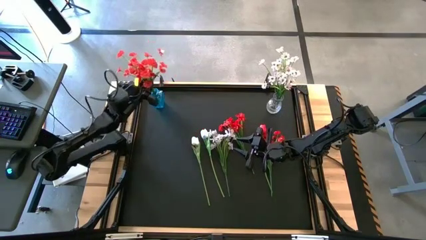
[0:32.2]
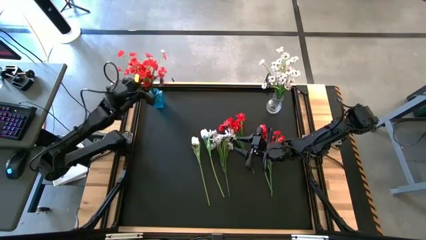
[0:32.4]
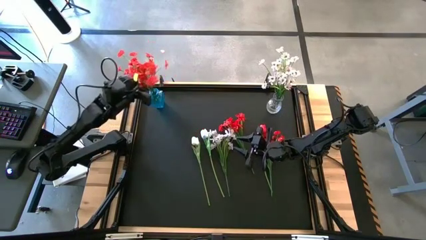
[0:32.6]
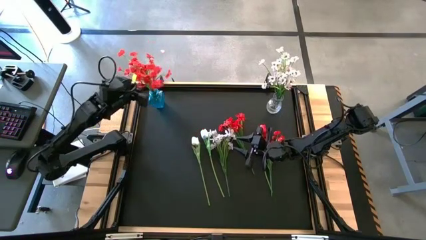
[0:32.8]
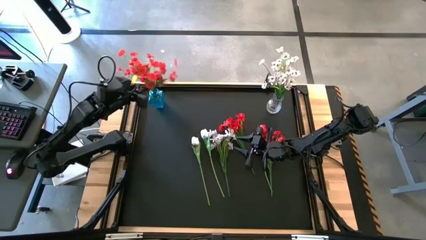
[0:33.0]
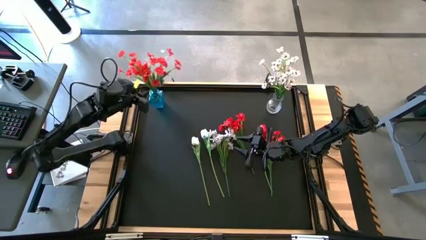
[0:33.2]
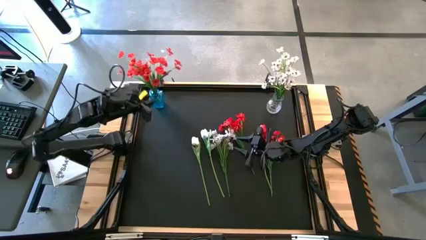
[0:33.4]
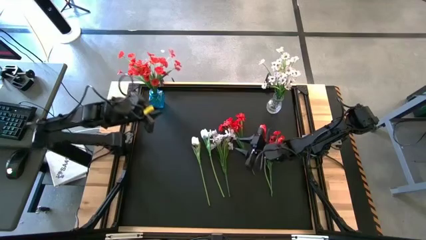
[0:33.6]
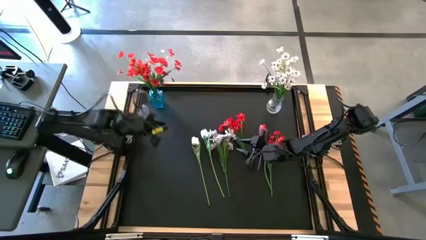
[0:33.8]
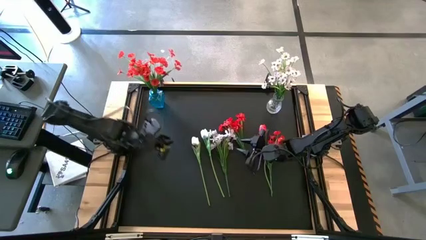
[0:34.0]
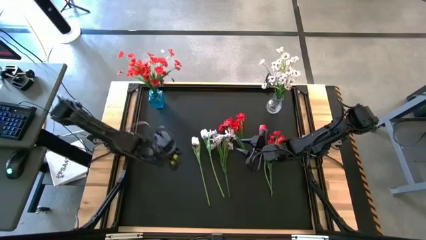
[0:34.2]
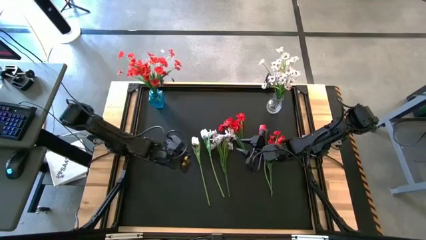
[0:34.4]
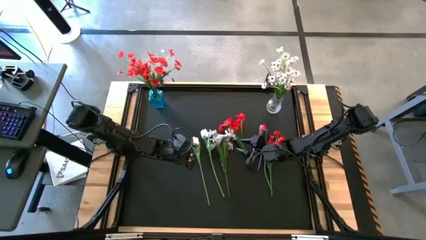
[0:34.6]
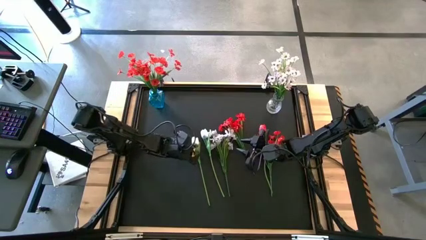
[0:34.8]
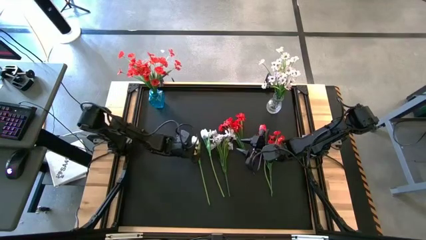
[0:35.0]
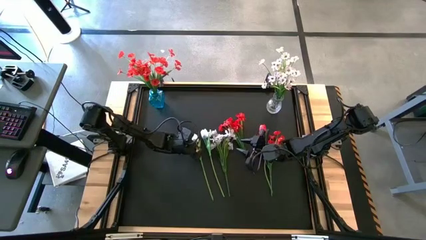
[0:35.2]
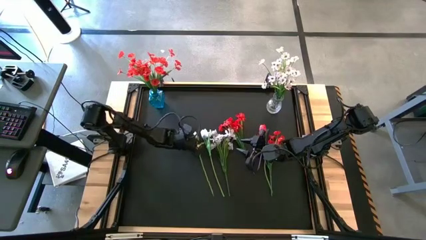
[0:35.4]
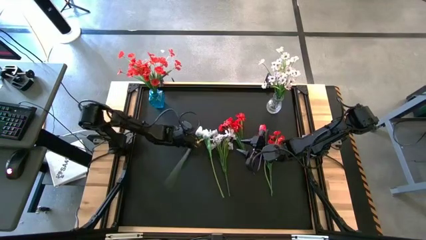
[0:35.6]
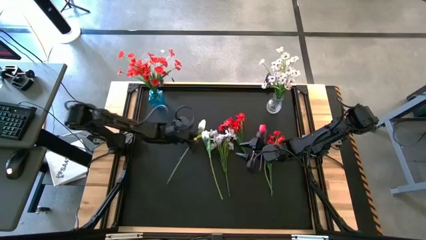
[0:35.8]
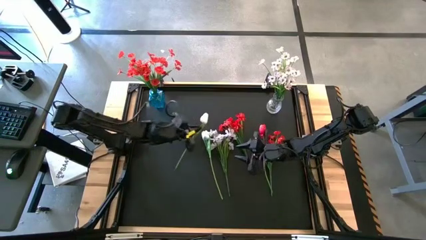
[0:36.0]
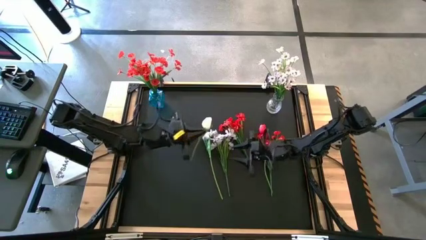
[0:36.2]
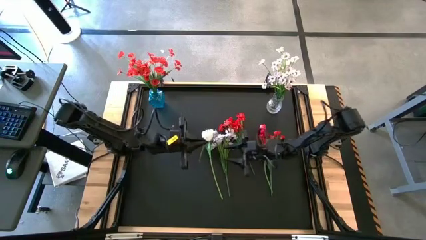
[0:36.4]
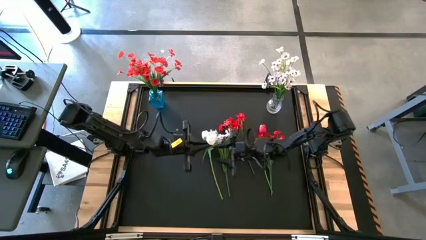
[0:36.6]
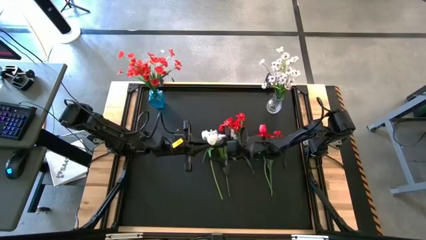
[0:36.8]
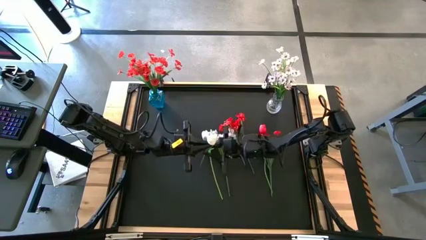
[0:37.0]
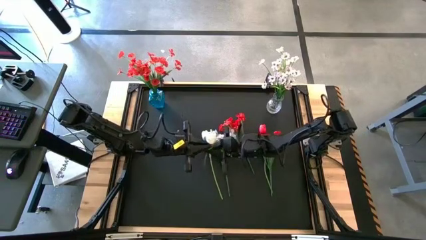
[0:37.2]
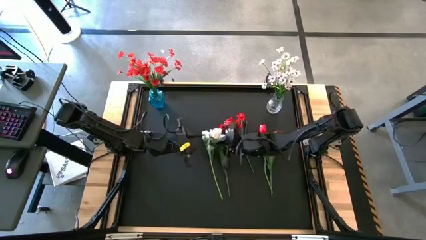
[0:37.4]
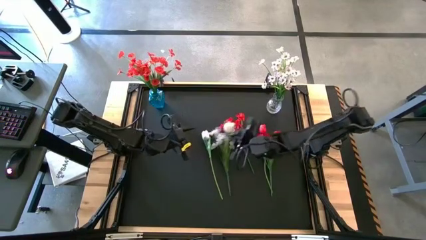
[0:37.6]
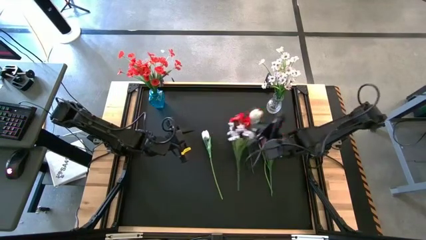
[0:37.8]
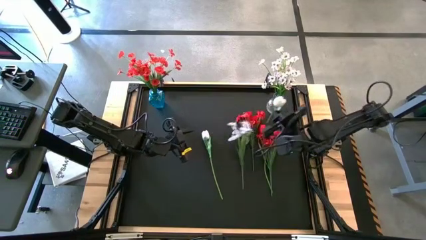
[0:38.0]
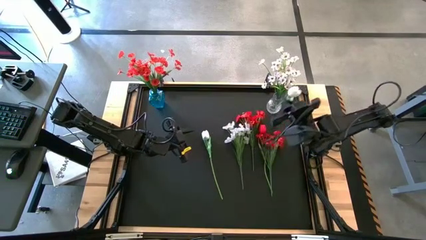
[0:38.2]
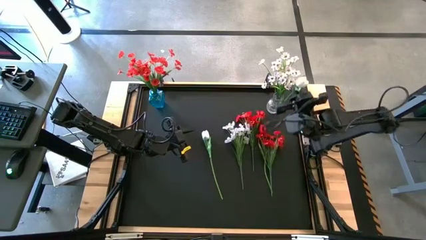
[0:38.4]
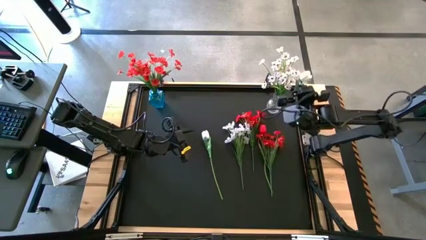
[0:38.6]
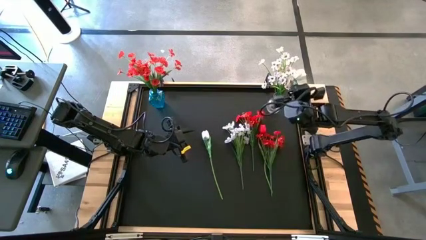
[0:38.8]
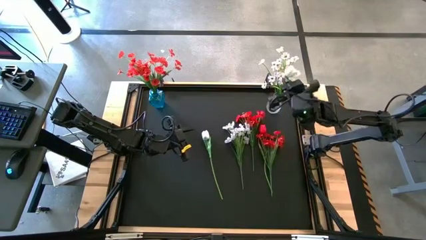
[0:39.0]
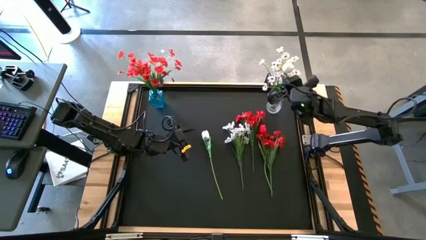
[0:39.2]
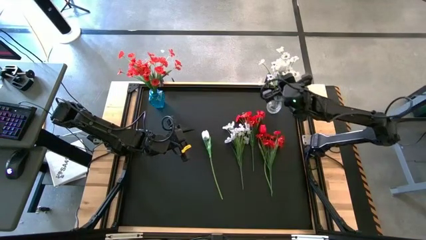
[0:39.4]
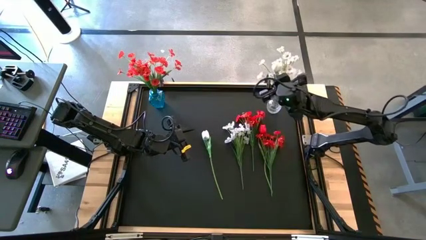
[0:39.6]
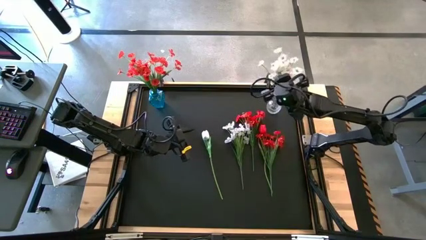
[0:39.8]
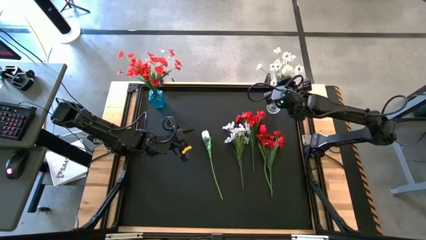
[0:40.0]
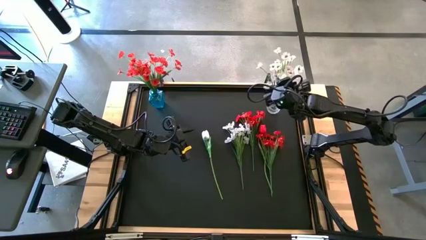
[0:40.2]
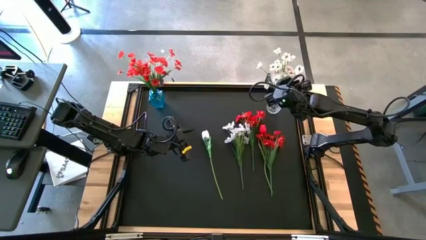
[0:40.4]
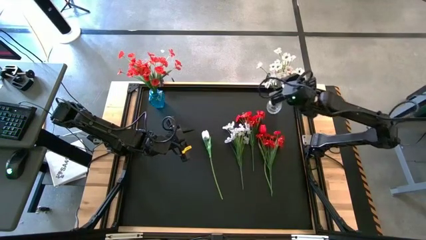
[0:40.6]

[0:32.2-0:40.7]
Task: Sort flowers into vase by color
Put the white tulip into the transparent vase

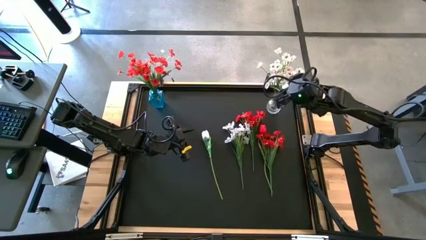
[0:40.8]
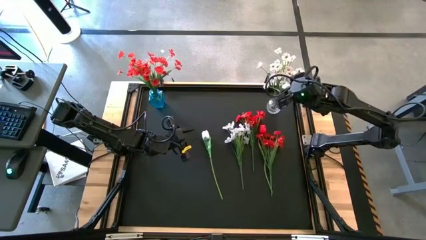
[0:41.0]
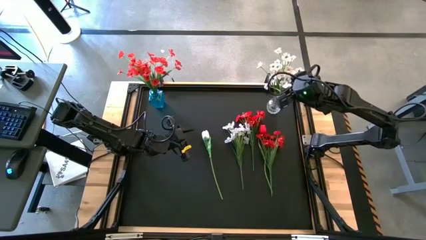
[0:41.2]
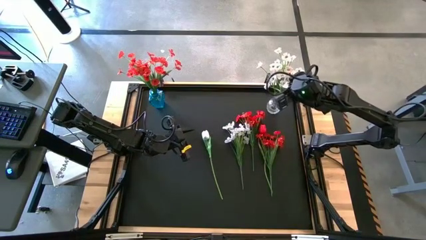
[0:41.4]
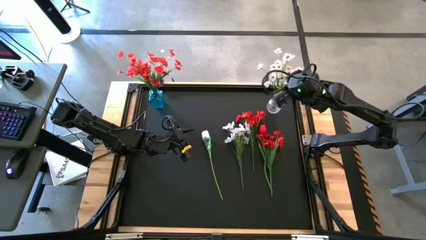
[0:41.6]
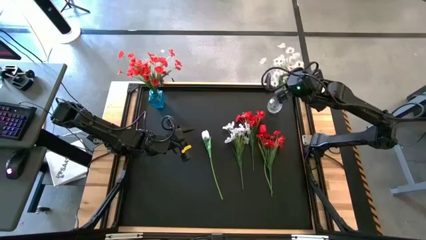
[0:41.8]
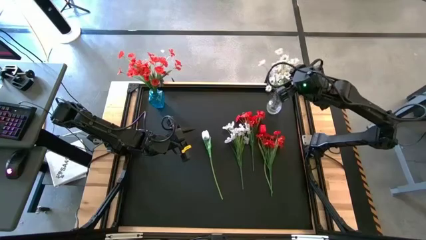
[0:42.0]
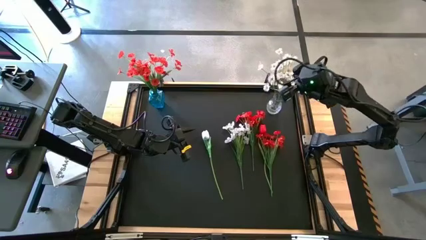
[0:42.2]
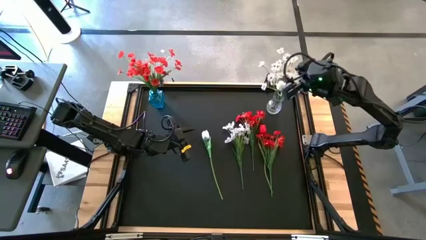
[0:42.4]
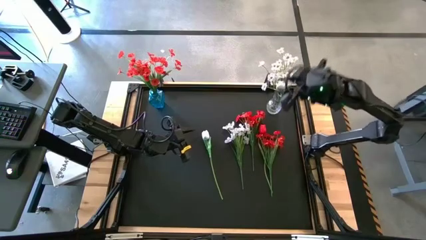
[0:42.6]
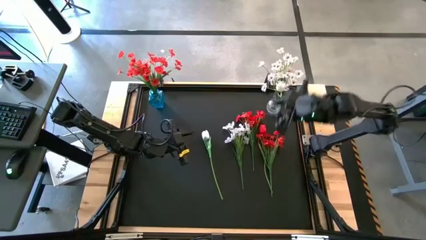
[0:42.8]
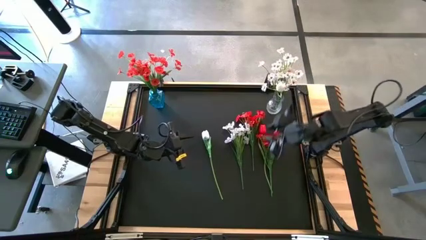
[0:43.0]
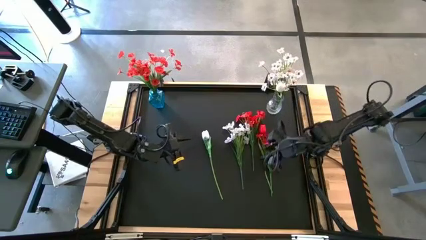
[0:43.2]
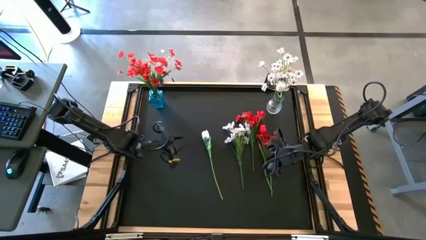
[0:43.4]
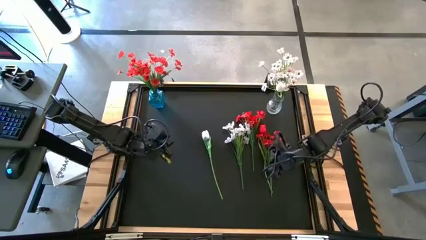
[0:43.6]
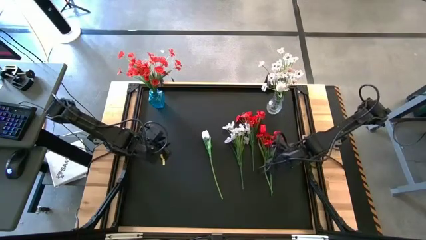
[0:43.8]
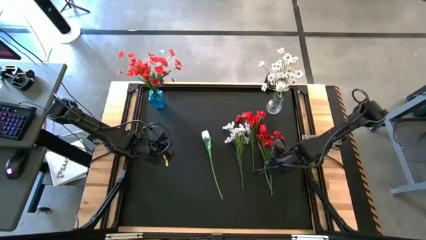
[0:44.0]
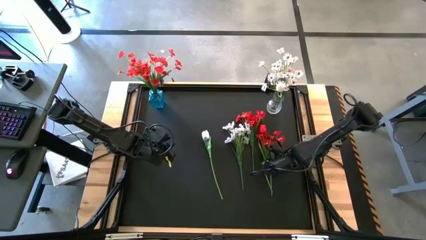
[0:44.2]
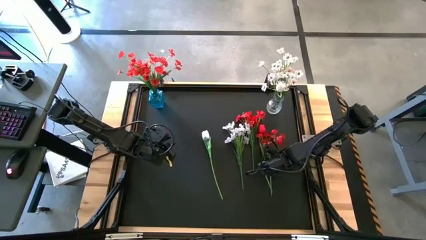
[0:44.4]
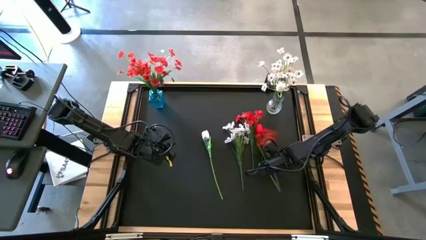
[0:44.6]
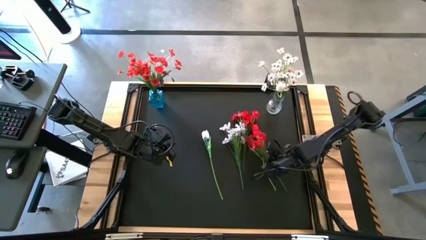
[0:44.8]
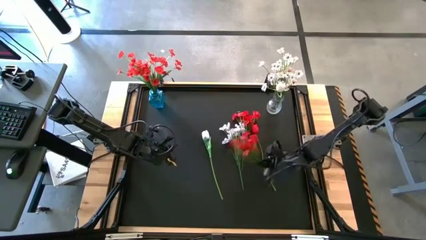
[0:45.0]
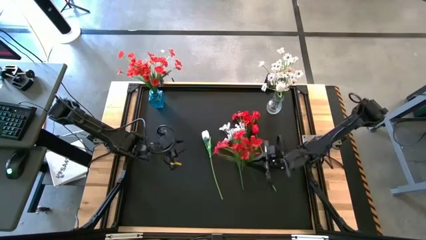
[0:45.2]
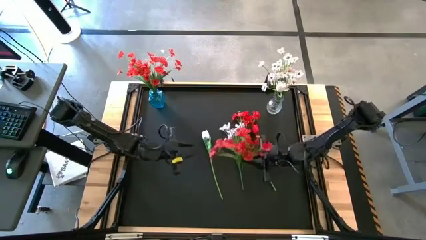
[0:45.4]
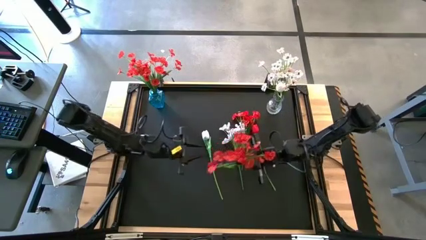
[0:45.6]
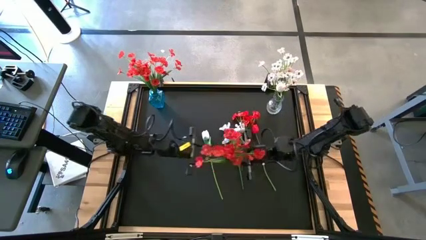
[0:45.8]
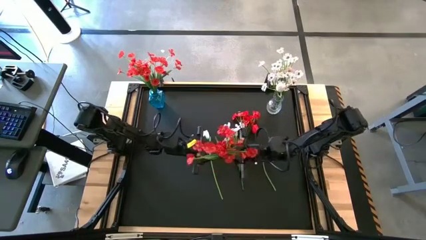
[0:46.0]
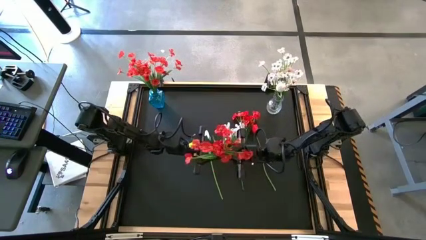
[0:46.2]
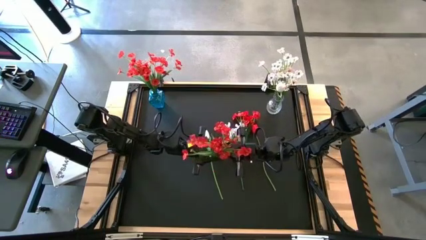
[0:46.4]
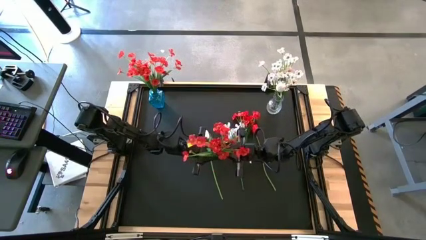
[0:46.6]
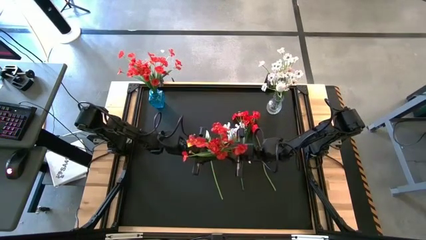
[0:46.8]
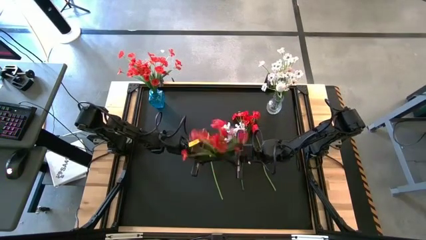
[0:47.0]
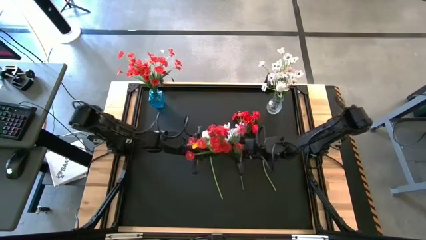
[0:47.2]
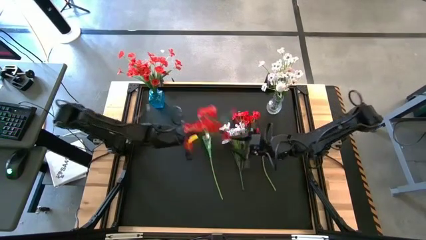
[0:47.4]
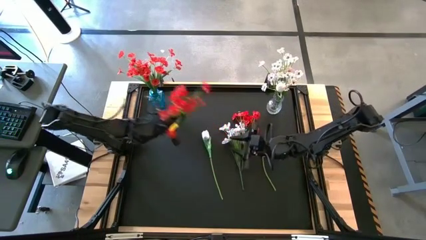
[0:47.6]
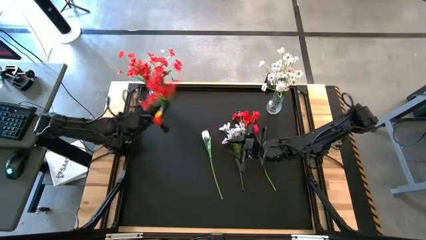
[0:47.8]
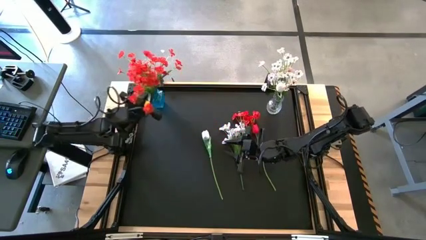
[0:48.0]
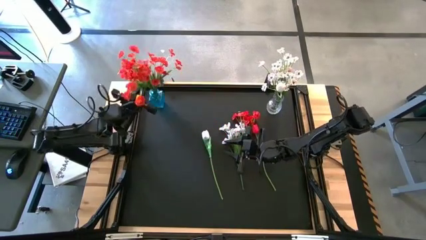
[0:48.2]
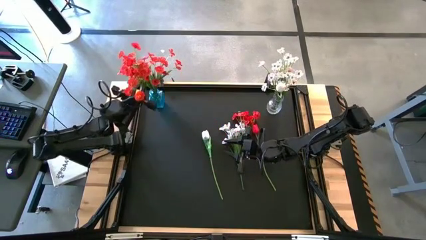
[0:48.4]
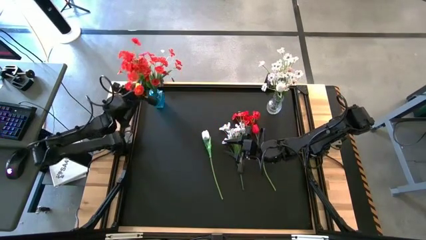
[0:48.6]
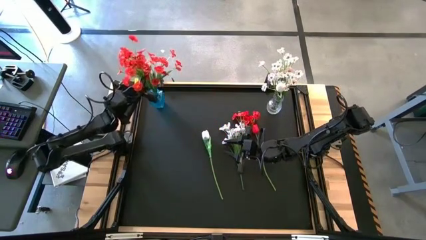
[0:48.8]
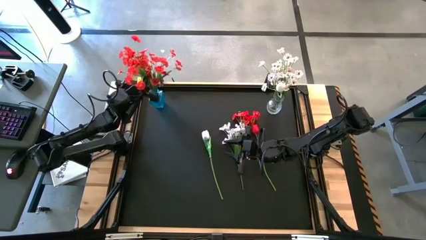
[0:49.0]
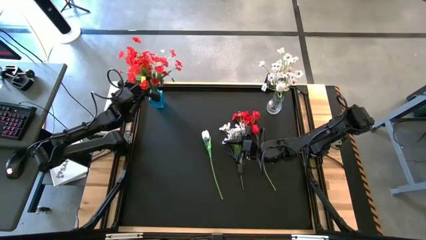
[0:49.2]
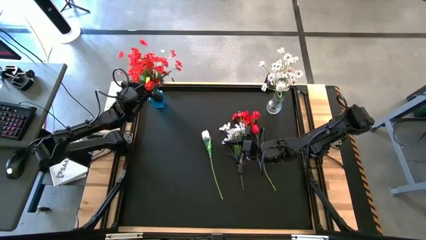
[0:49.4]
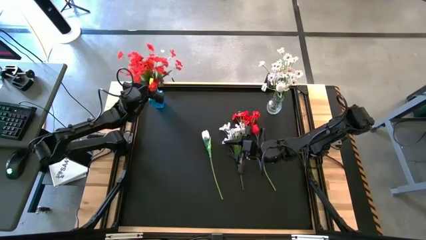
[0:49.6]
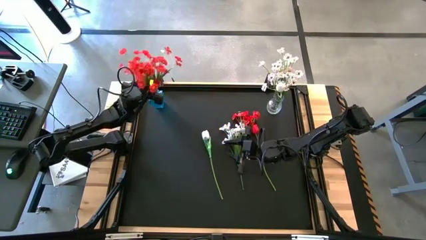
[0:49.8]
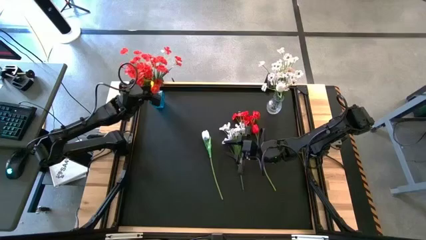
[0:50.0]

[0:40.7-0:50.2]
Put the orange orchid into the blue vase
